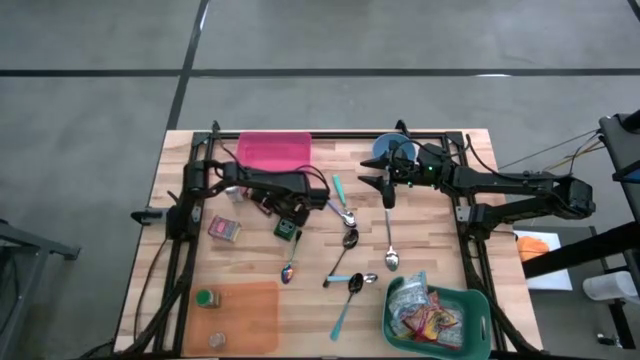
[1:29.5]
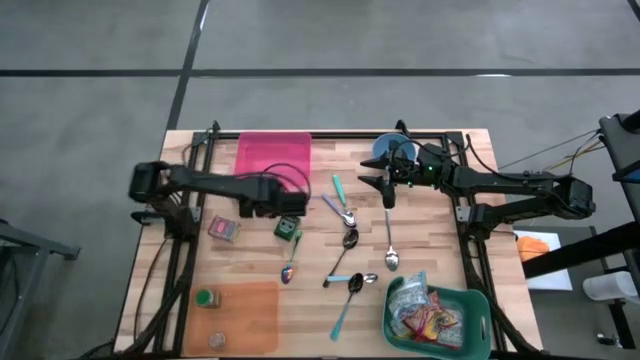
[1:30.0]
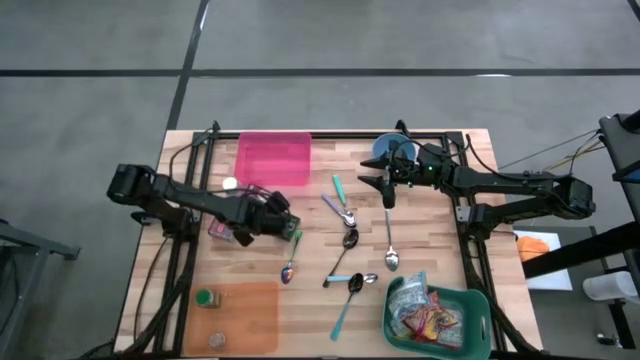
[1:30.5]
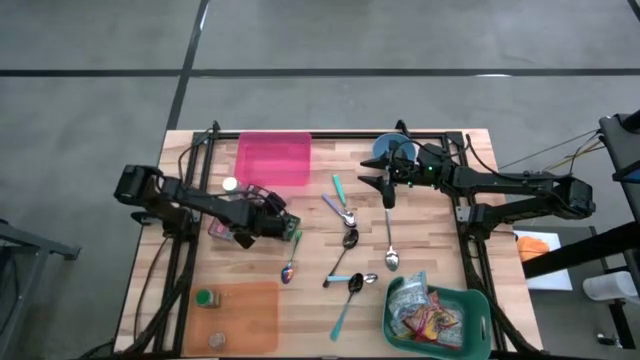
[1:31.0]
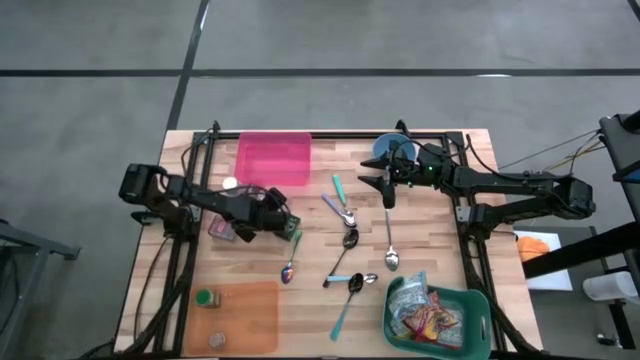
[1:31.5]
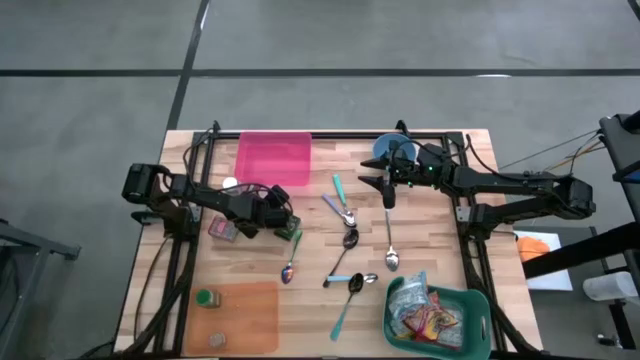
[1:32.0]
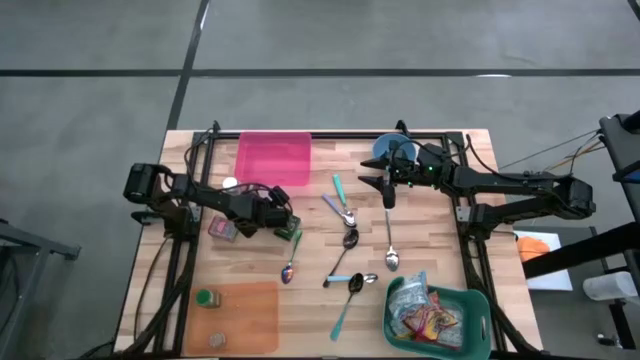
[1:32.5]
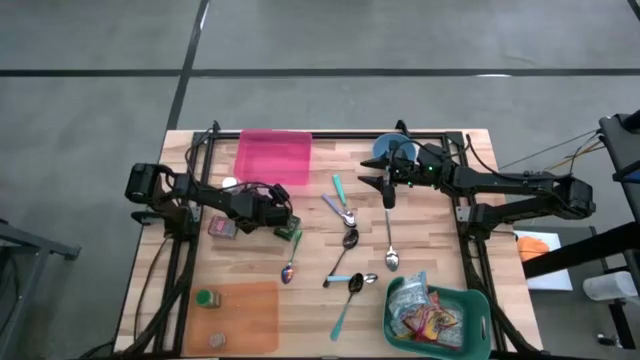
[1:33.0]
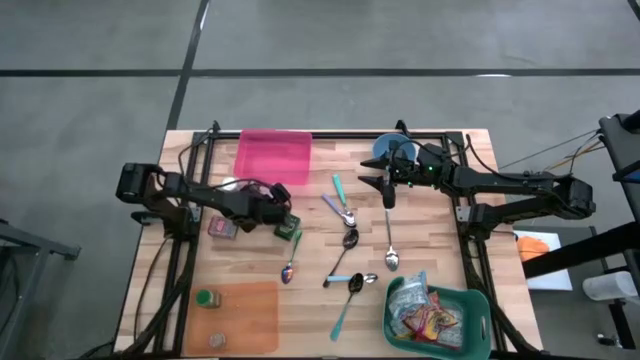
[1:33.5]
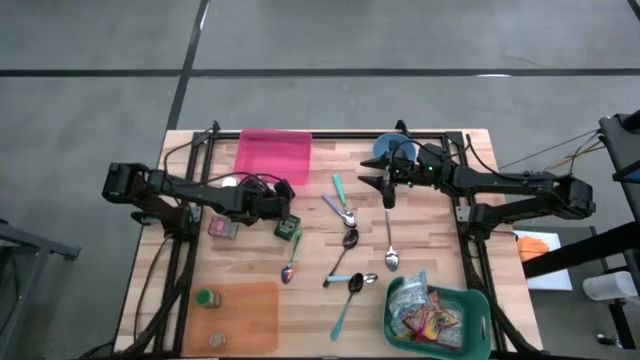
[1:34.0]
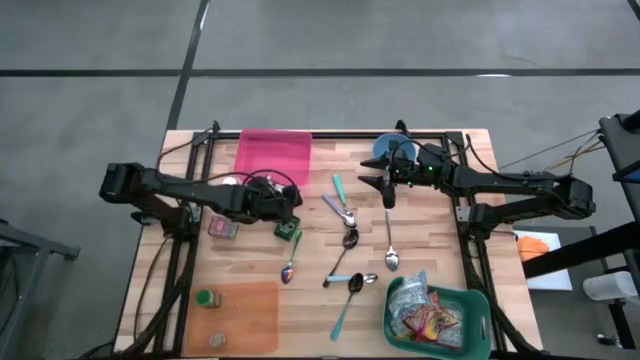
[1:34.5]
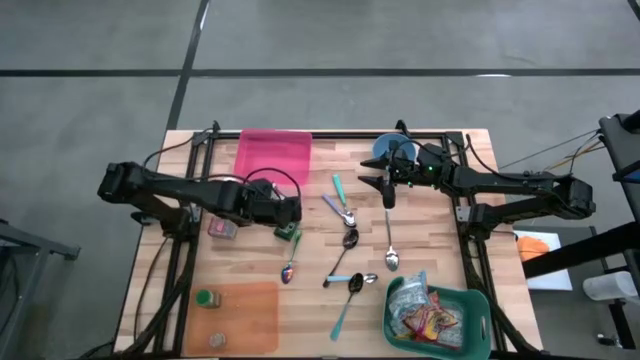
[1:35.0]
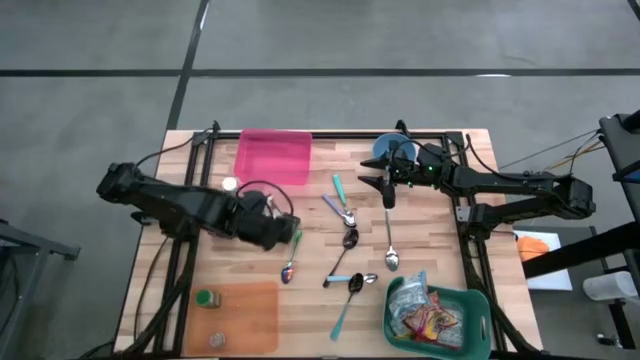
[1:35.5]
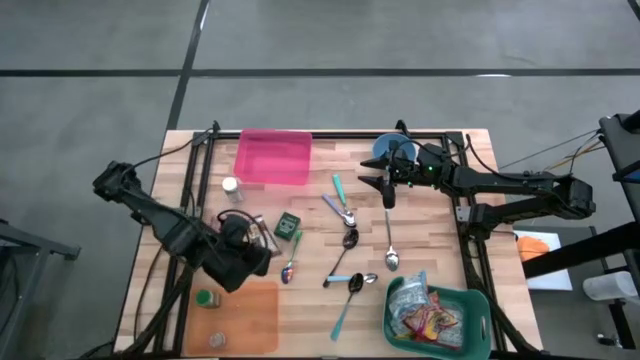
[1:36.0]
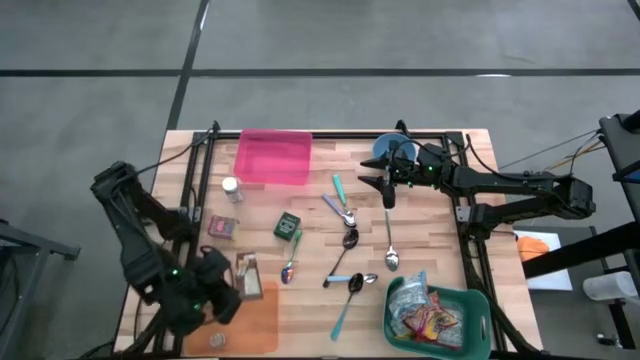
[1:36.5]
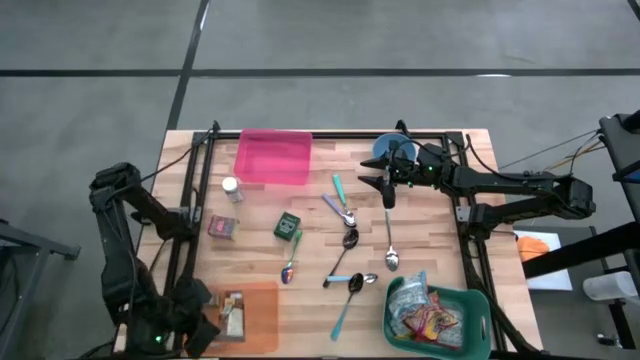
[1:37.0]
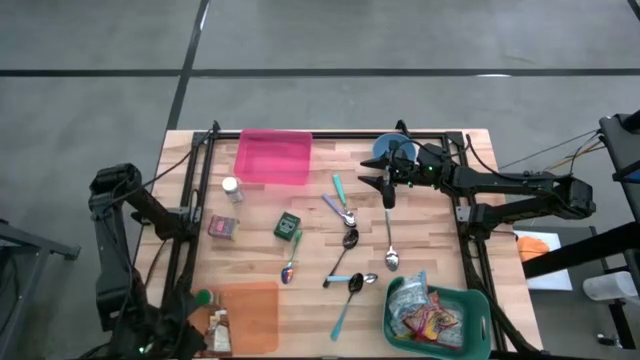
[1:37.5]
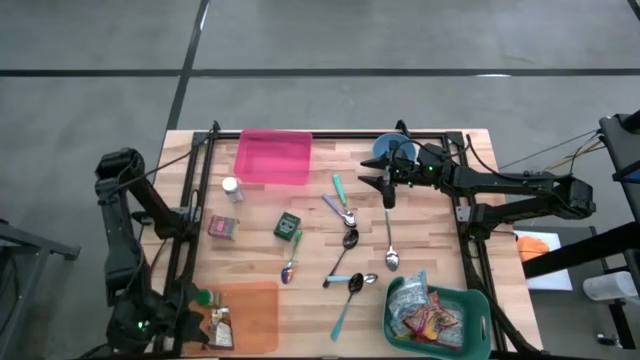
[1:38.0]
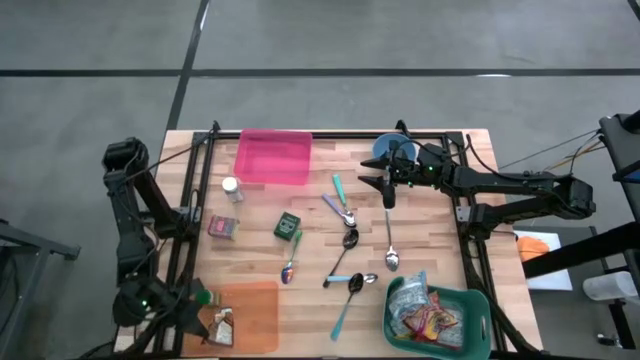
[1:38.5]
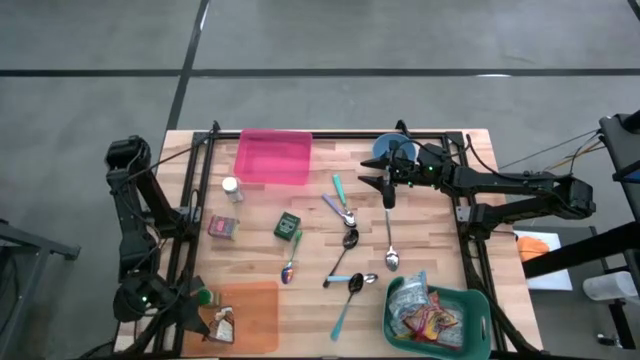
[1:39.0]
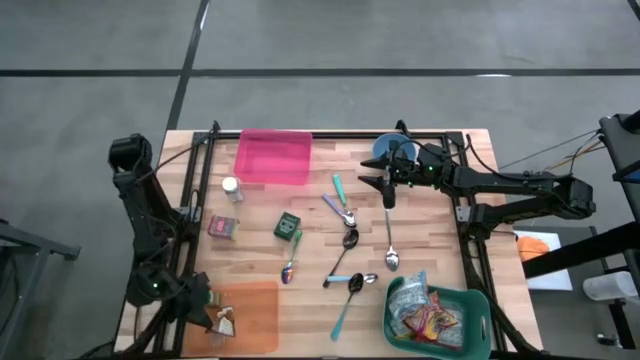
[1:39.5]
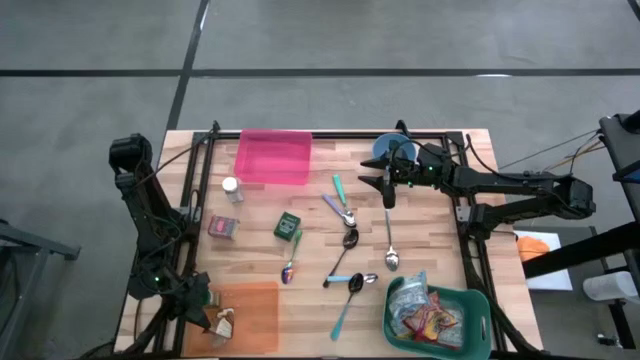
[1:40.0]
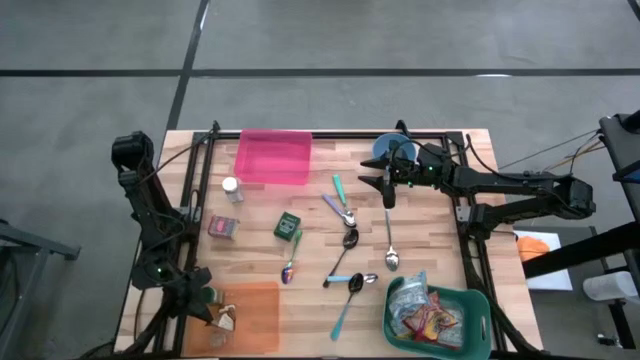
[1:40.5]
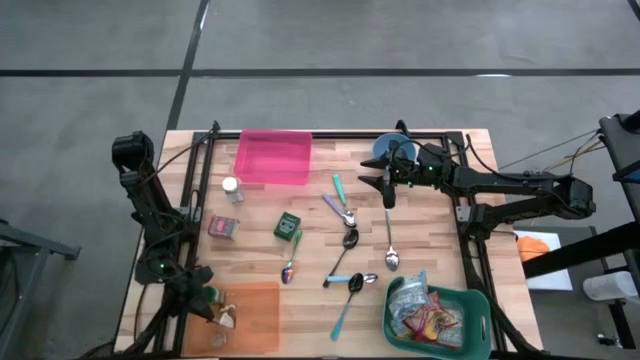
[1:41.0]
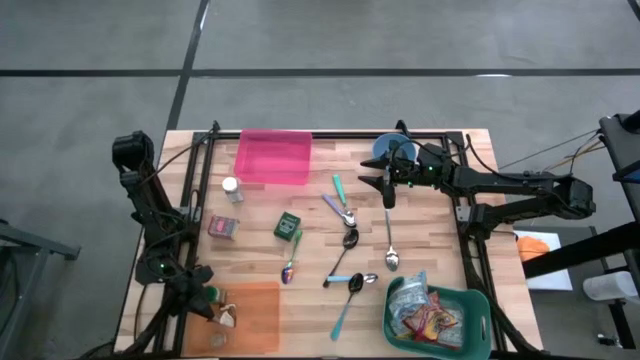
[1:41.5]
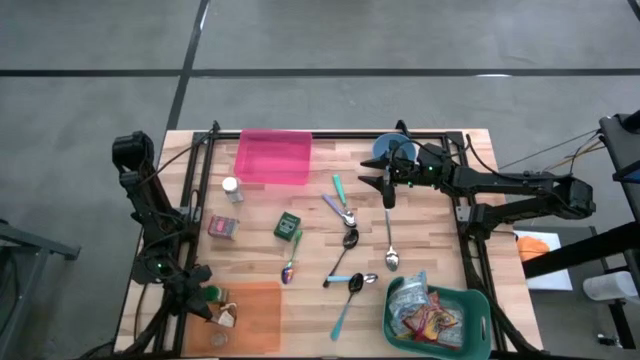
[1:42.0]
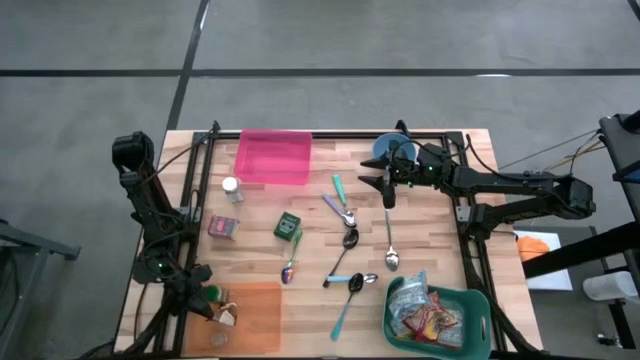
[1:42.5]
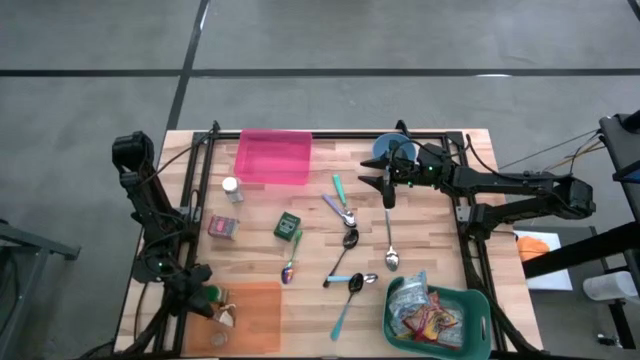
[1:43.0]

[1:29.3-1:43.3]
Put the orange seasoning pack into the orange bin

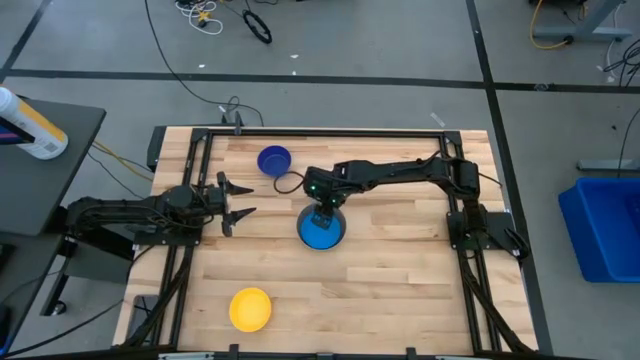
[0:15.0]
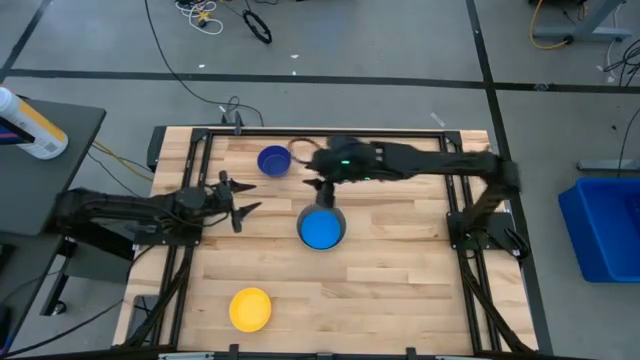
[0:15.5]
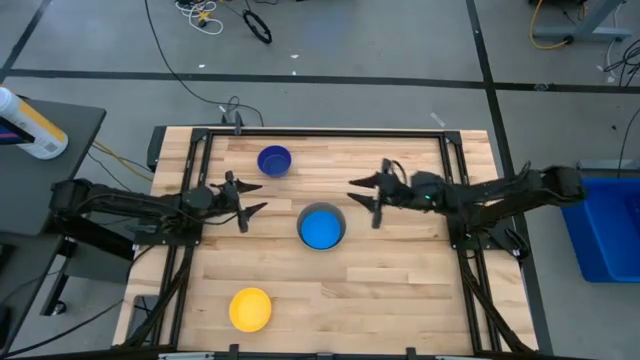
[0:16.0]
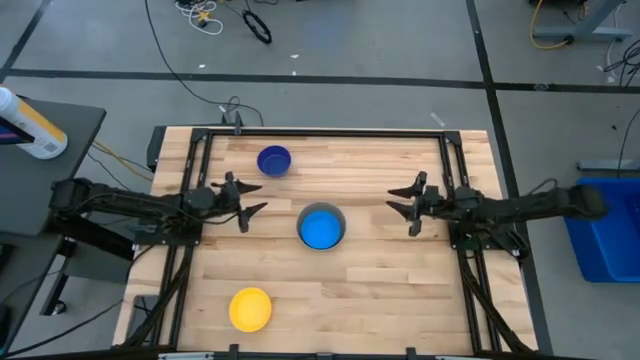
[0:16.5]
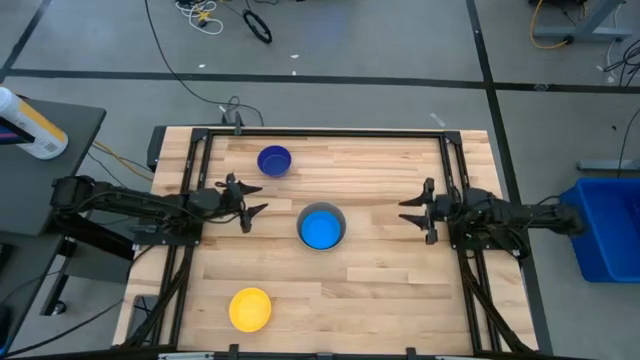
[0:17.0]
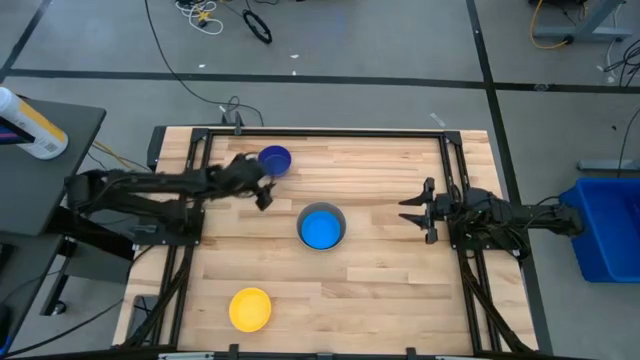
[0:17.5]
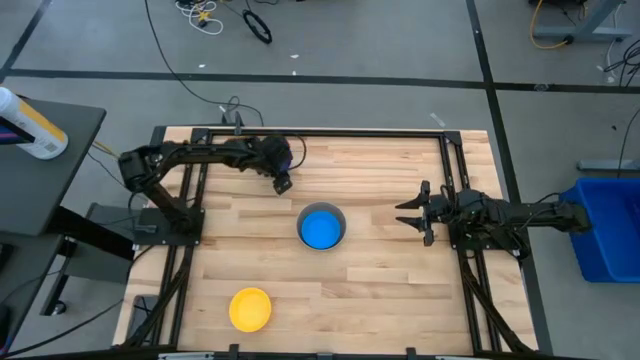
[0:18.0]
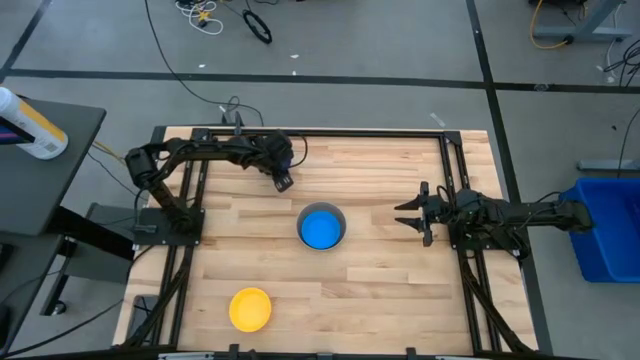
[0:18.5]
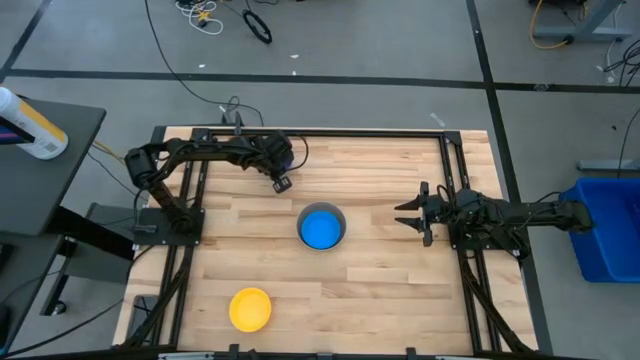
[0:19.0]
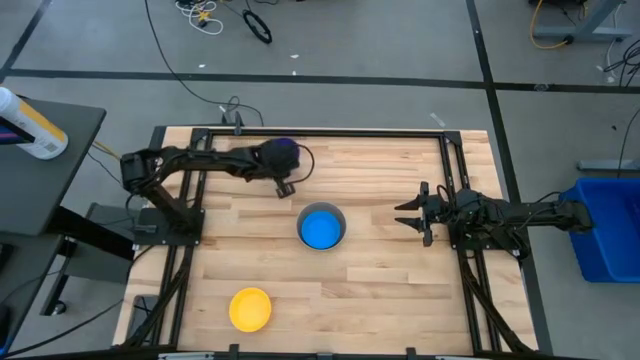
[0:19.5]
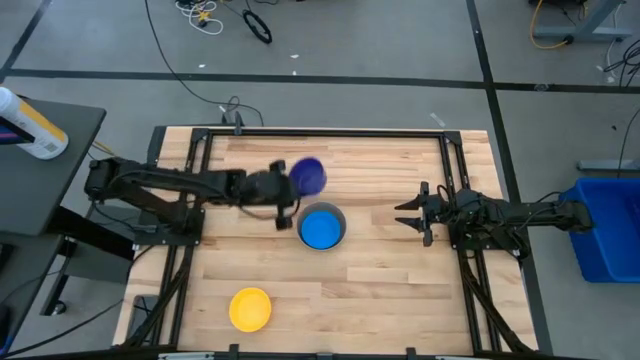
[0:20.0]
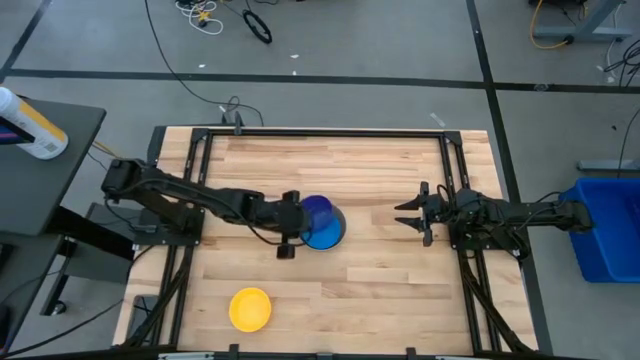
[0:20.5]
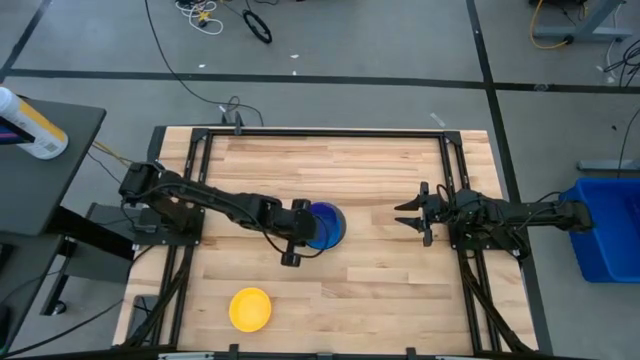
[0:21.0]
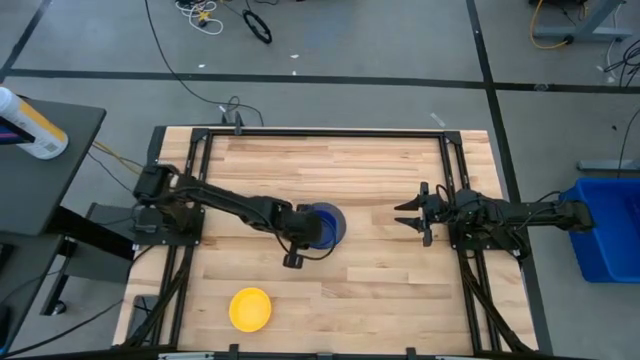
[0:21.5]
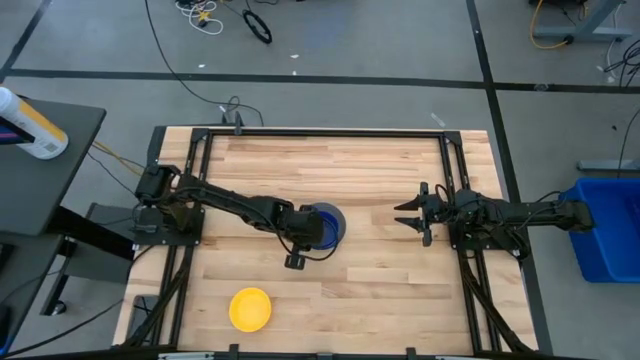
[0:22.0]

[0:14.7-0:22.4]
Stack the dark blue bowl on the blue bowl
